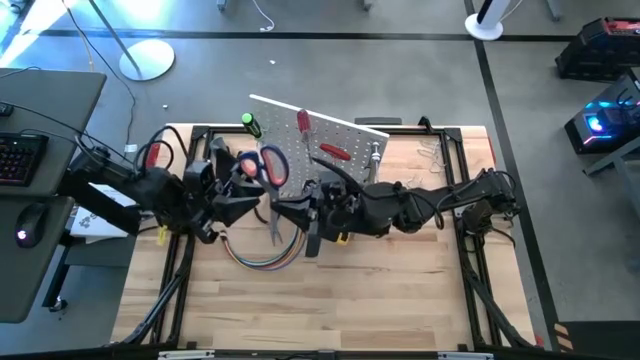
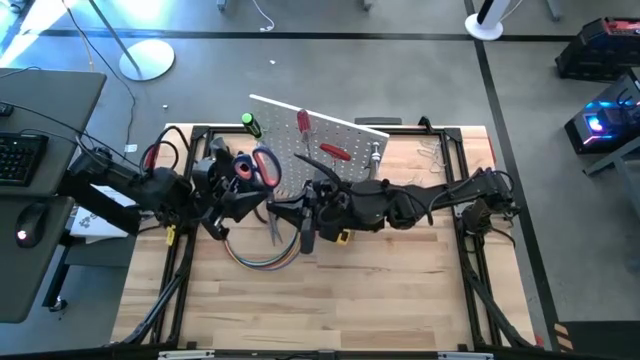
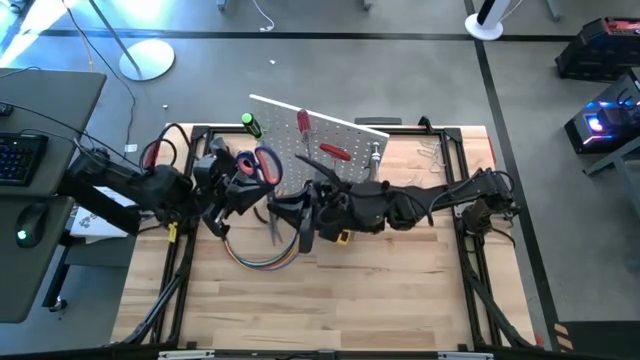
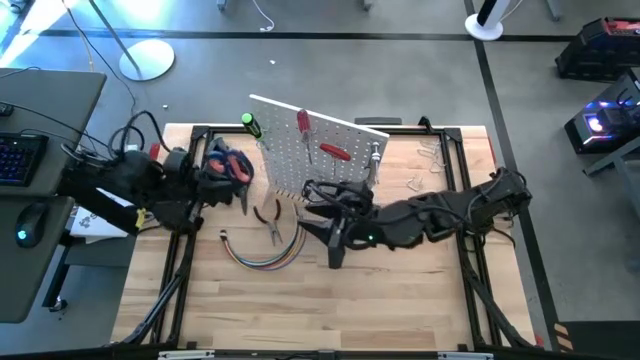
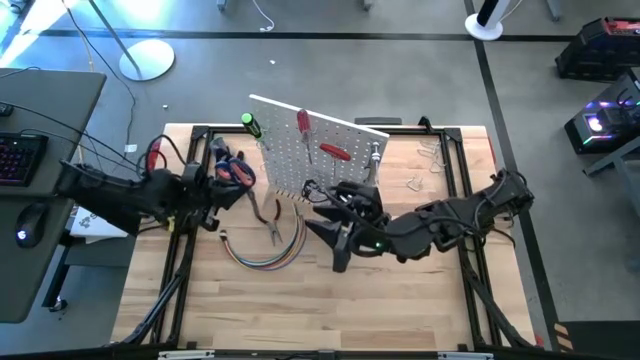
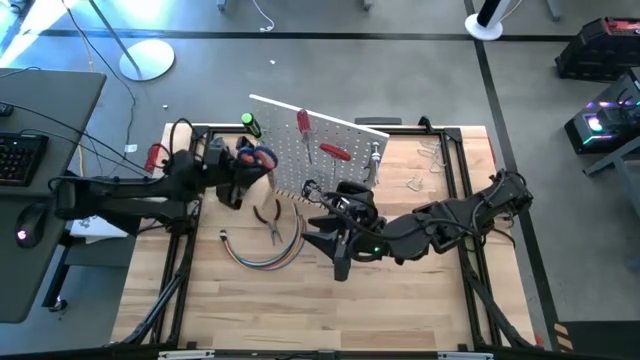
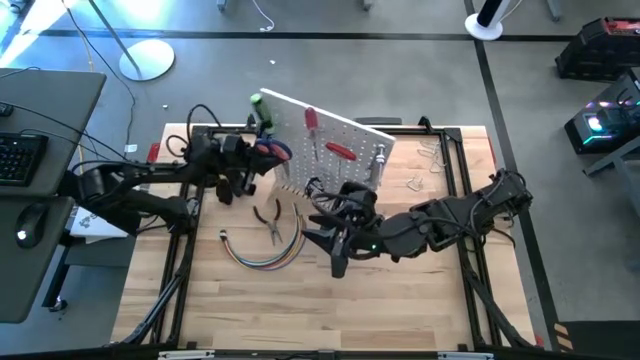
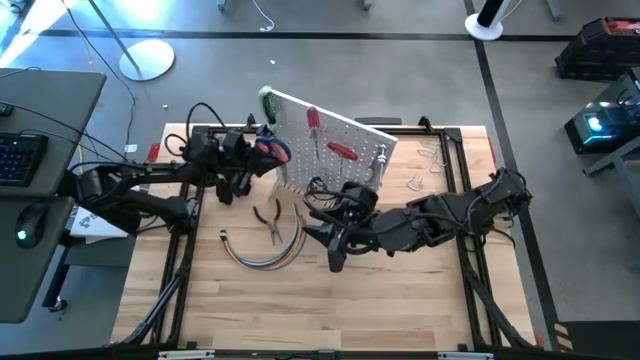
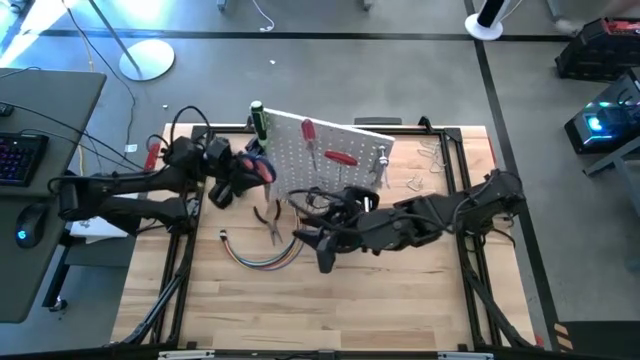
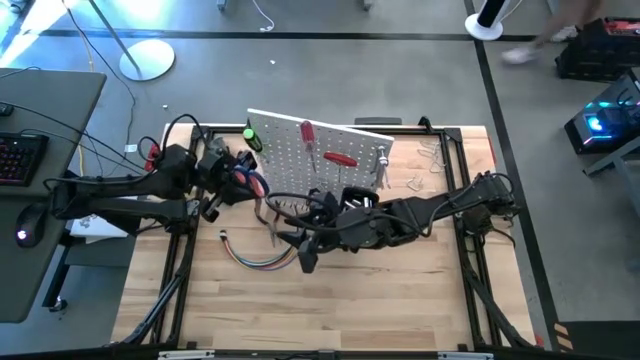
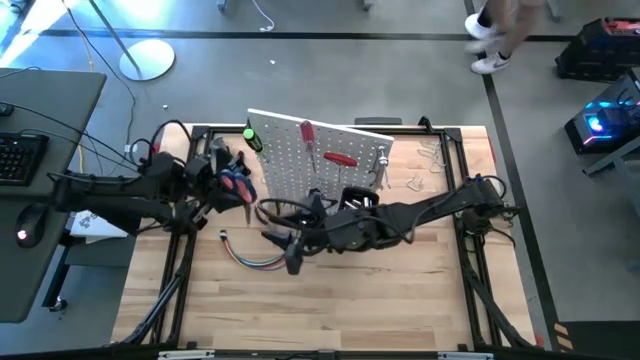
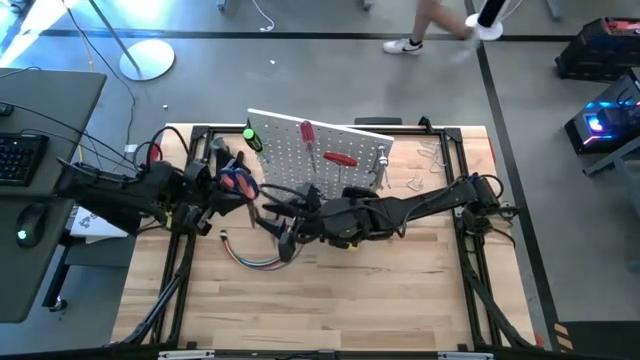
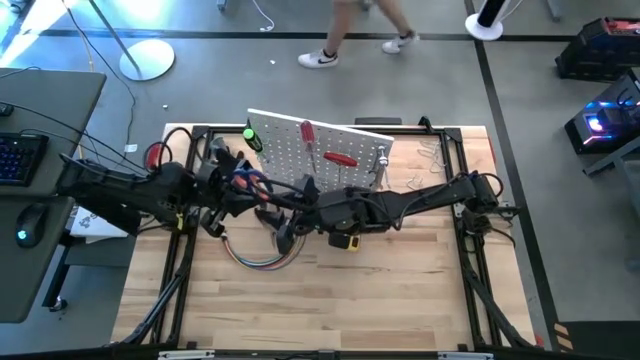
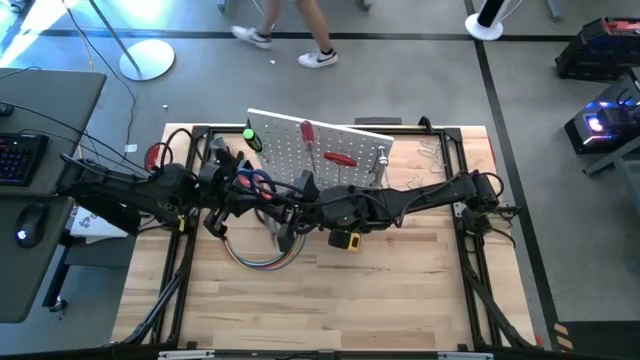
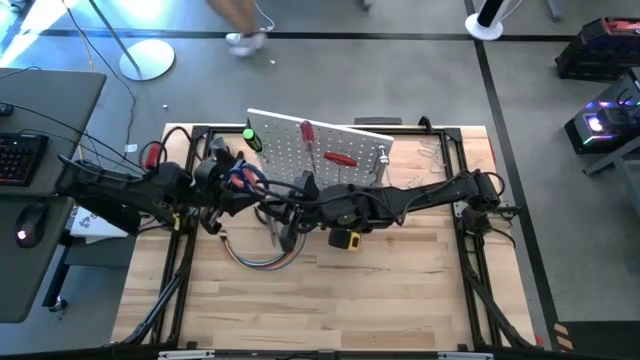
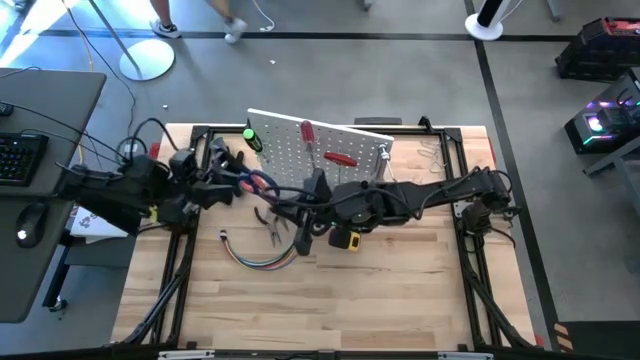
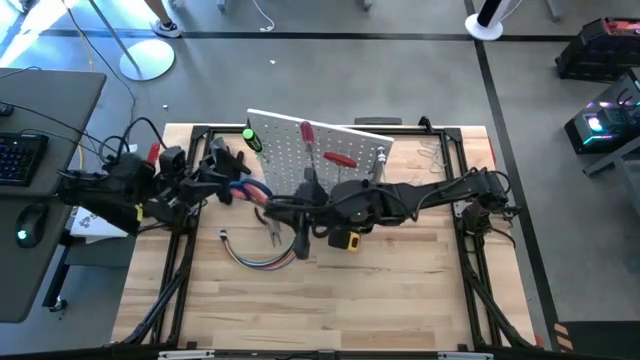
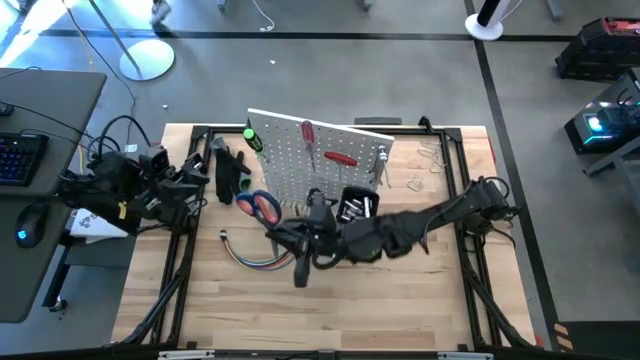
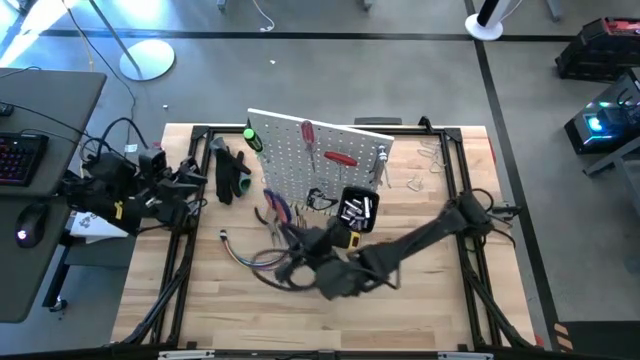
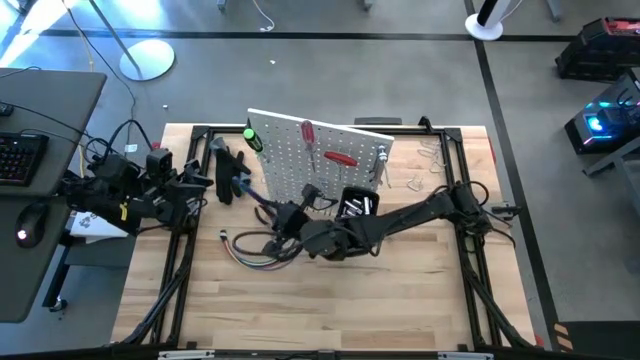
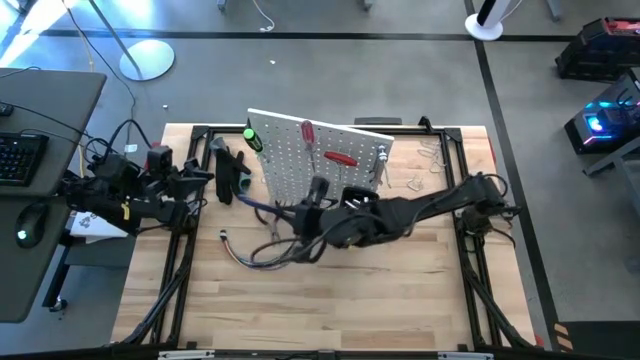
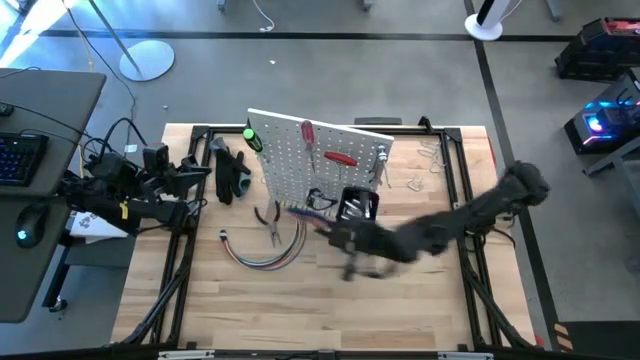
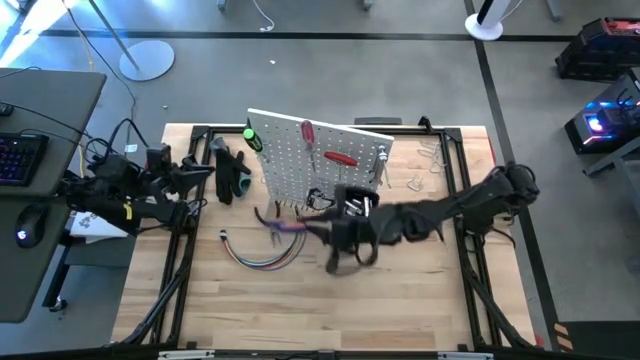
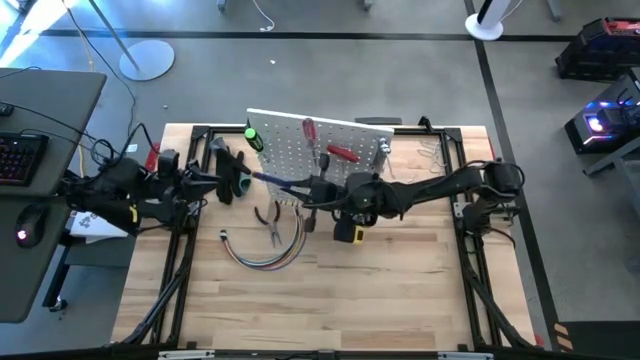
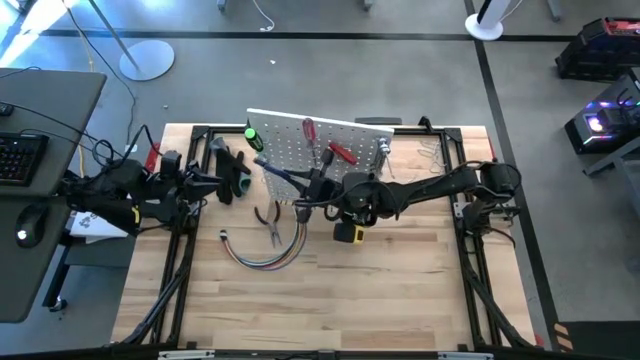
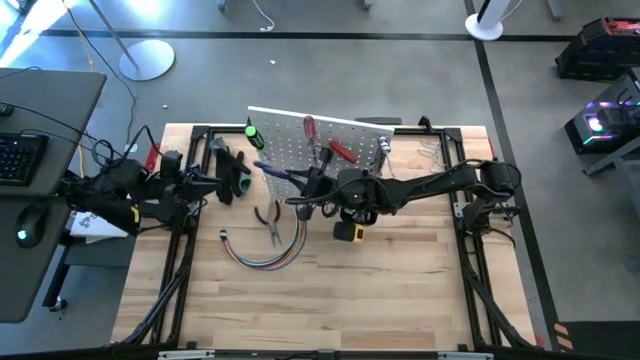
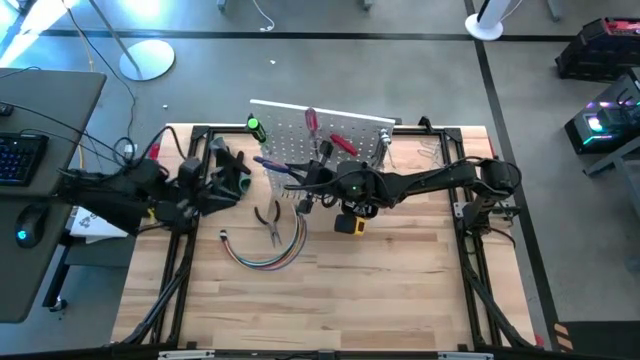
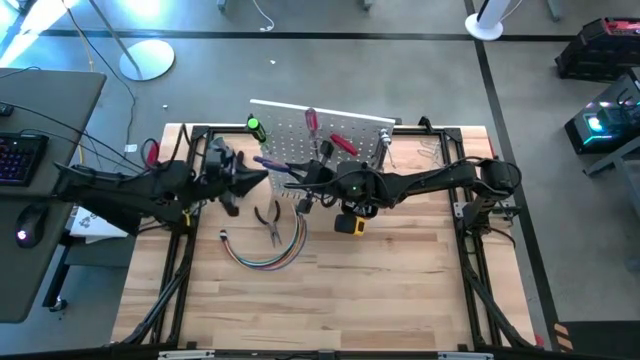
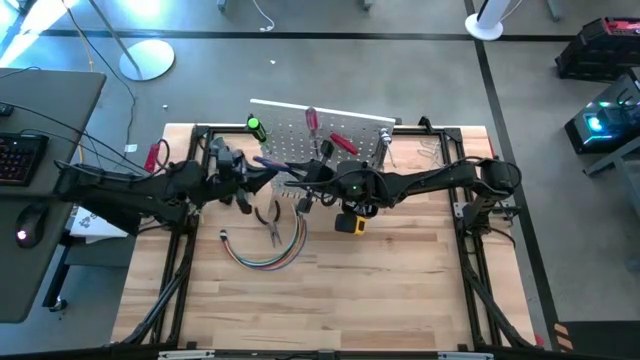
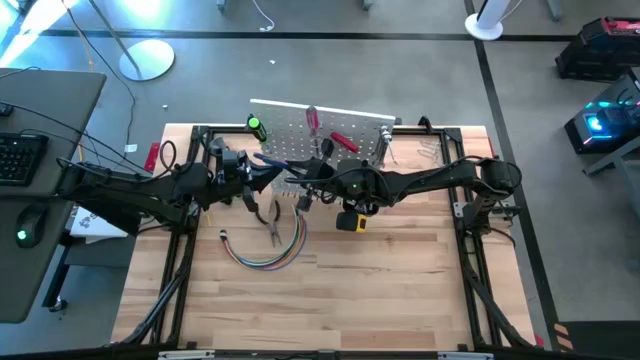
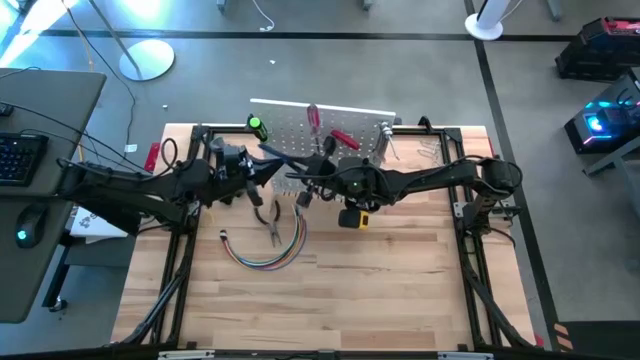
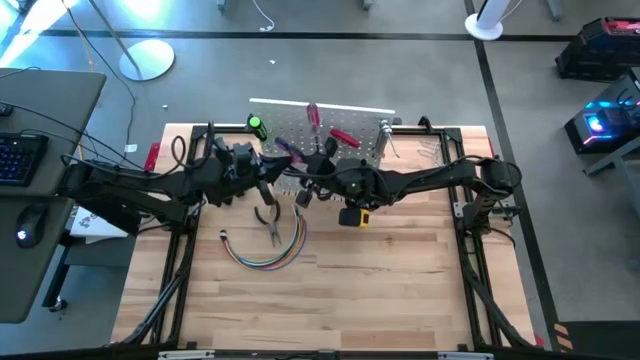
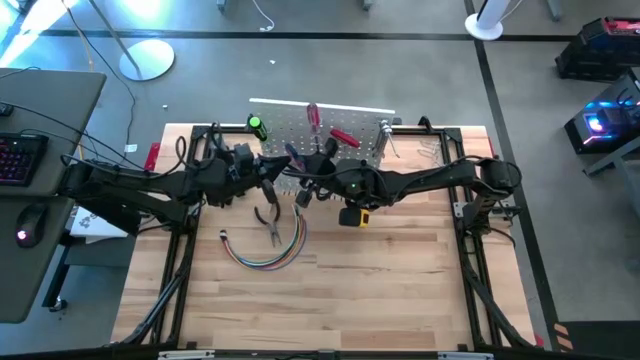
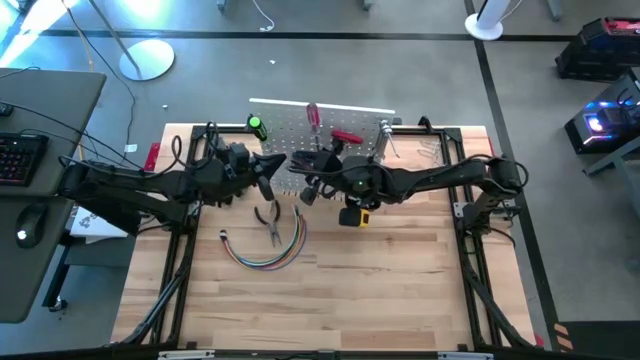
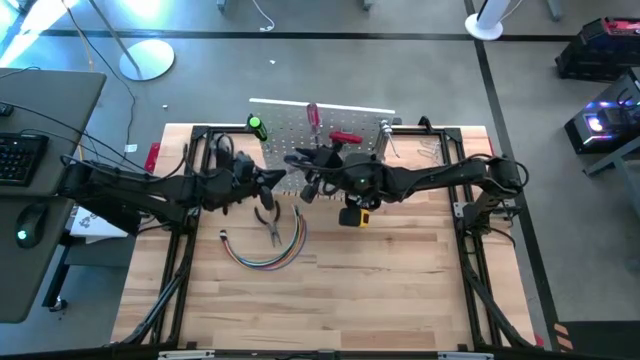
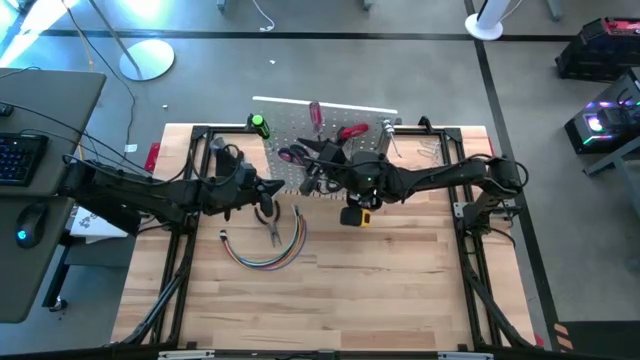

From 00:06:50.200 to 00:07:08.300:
Task: Hang tools onto peg board
Hang the scissors on the peg board
